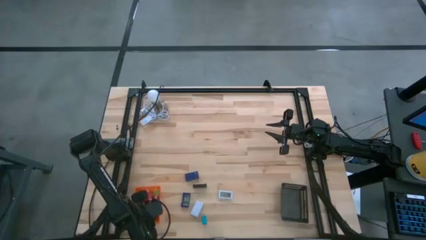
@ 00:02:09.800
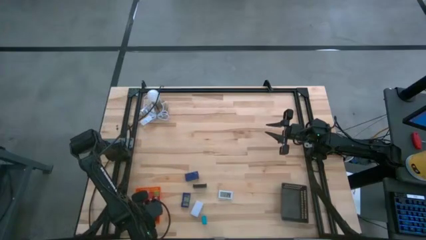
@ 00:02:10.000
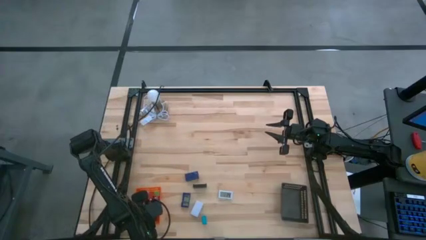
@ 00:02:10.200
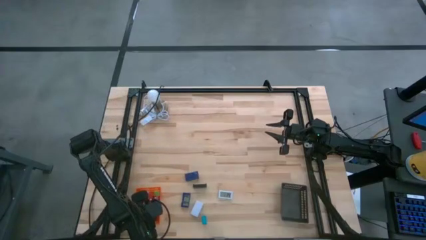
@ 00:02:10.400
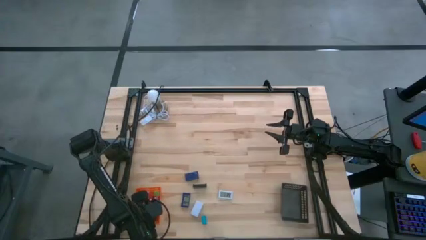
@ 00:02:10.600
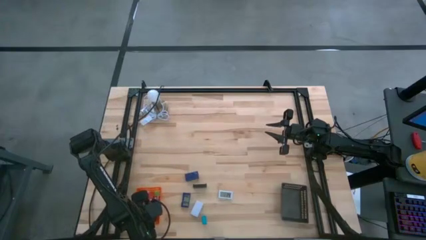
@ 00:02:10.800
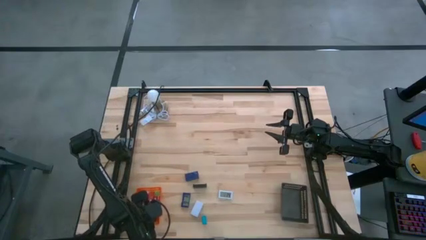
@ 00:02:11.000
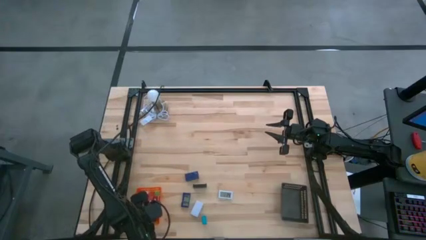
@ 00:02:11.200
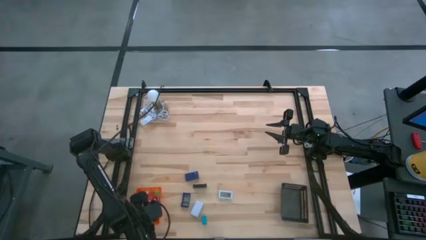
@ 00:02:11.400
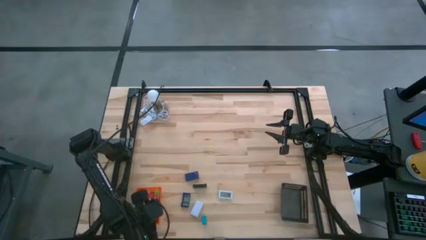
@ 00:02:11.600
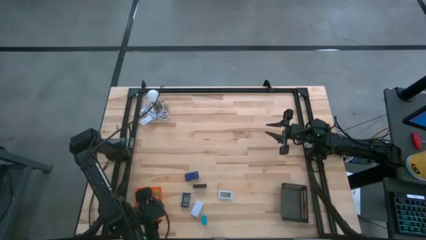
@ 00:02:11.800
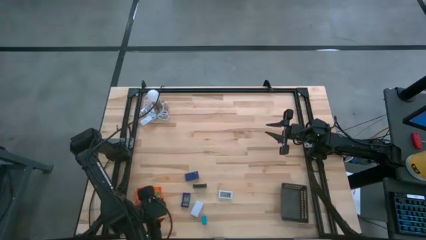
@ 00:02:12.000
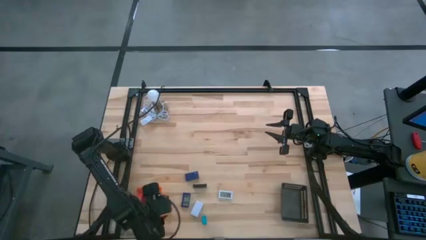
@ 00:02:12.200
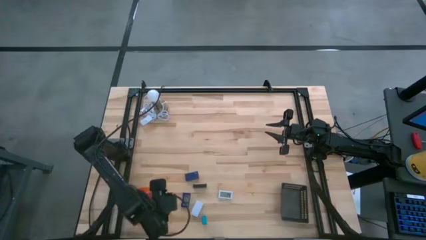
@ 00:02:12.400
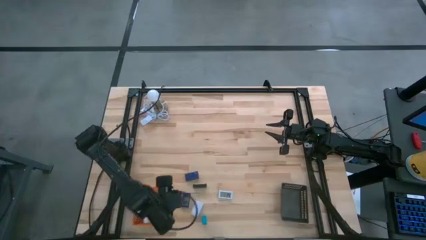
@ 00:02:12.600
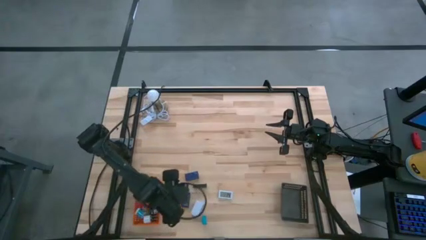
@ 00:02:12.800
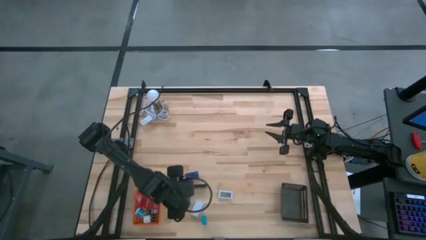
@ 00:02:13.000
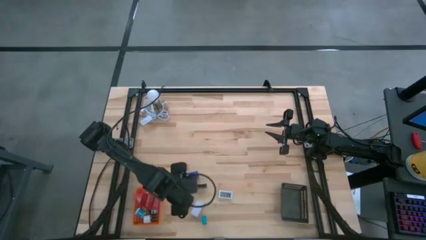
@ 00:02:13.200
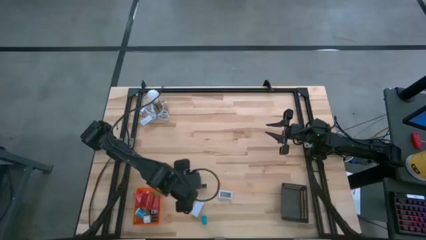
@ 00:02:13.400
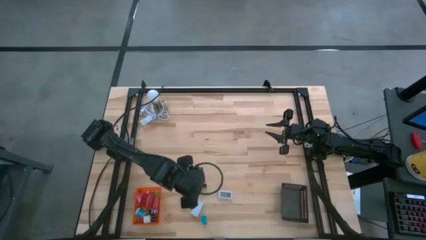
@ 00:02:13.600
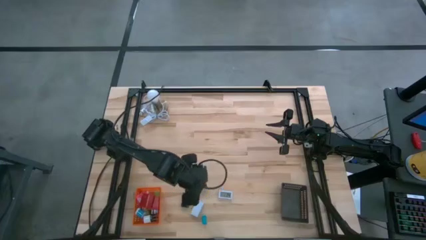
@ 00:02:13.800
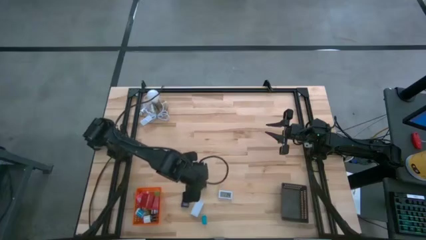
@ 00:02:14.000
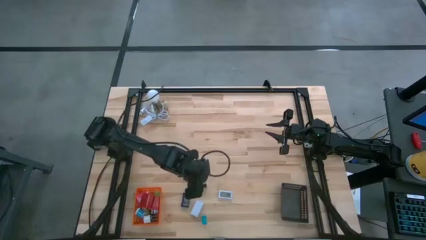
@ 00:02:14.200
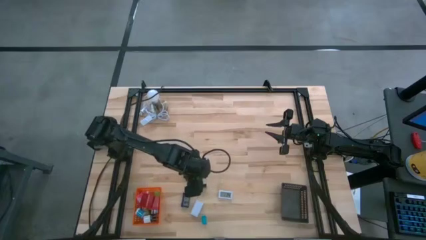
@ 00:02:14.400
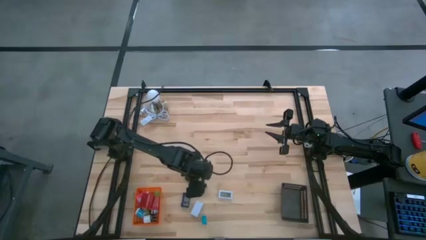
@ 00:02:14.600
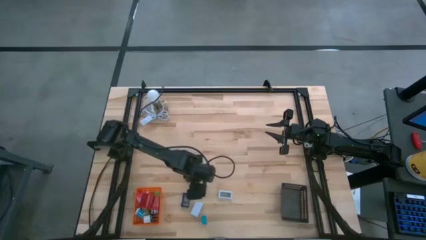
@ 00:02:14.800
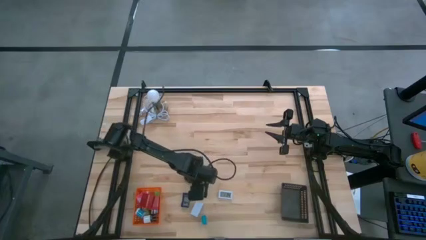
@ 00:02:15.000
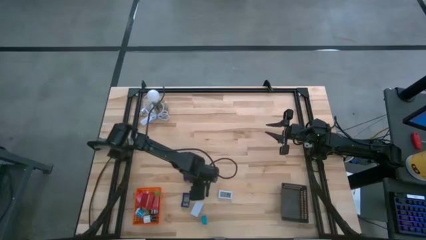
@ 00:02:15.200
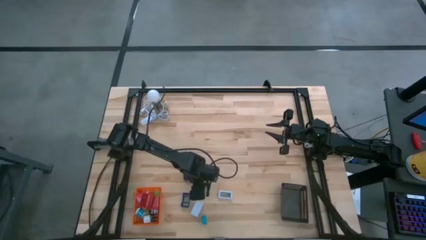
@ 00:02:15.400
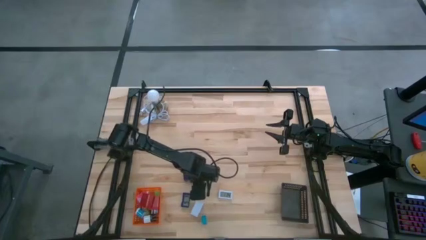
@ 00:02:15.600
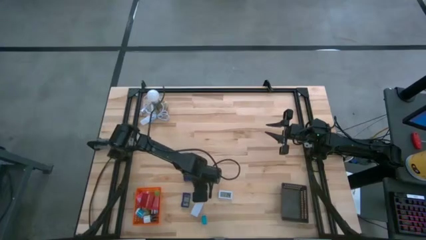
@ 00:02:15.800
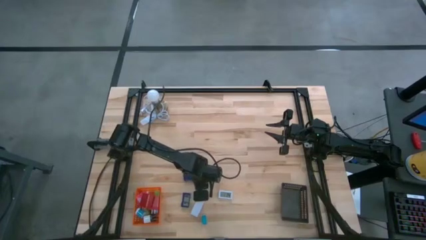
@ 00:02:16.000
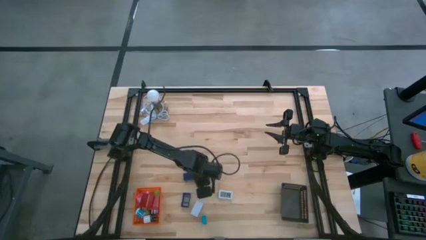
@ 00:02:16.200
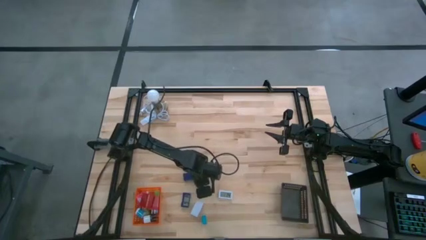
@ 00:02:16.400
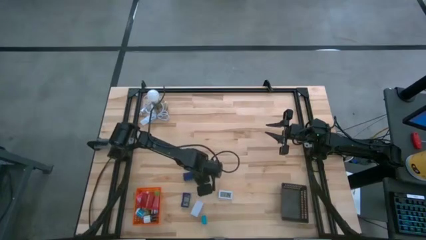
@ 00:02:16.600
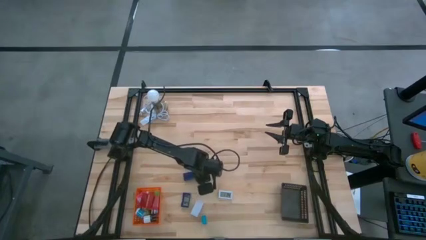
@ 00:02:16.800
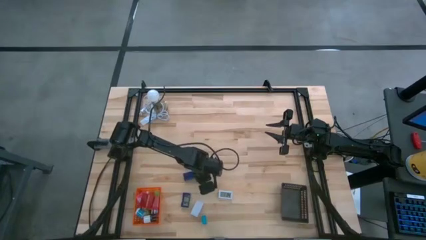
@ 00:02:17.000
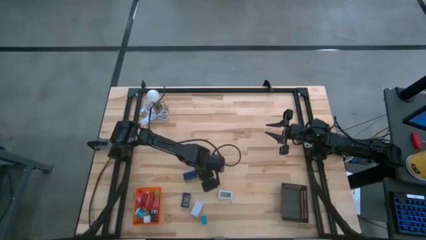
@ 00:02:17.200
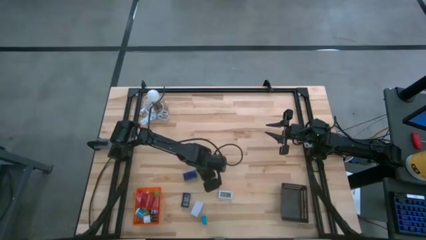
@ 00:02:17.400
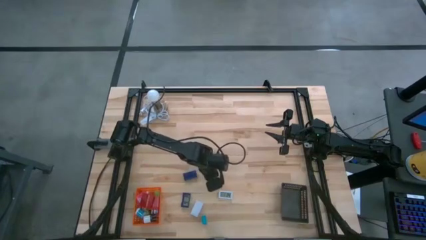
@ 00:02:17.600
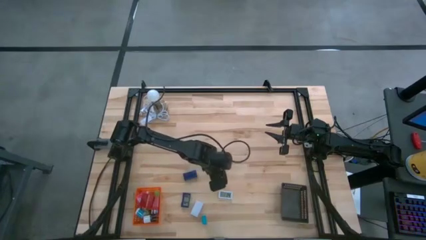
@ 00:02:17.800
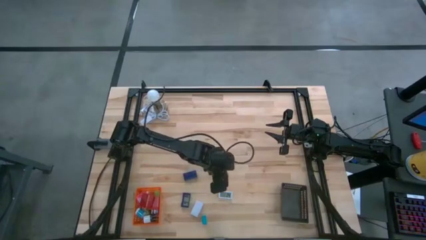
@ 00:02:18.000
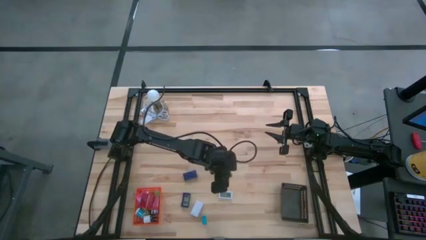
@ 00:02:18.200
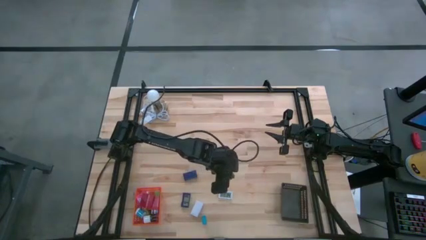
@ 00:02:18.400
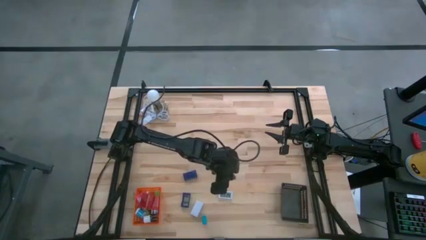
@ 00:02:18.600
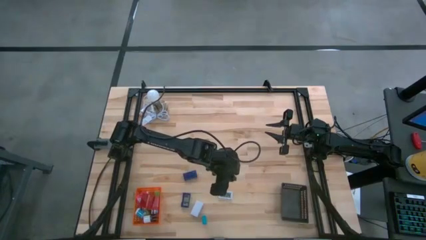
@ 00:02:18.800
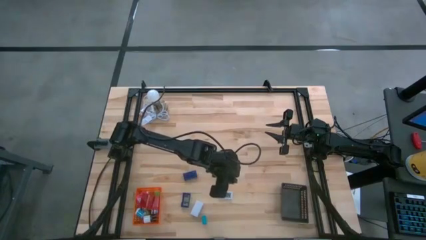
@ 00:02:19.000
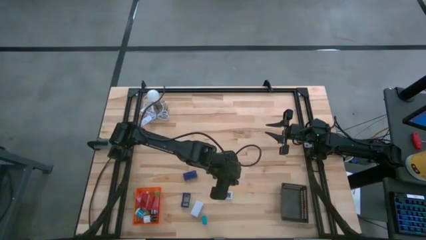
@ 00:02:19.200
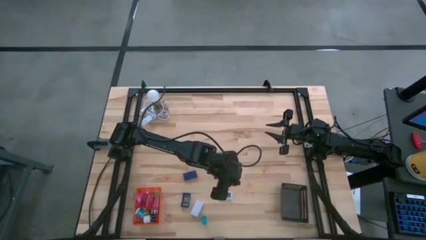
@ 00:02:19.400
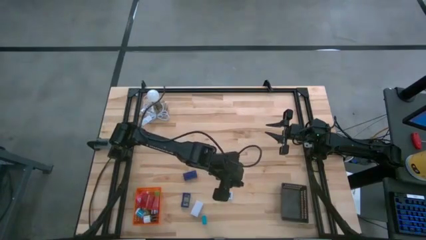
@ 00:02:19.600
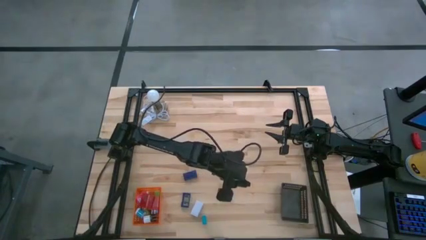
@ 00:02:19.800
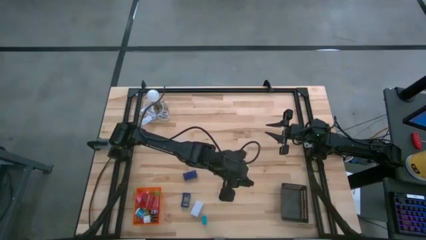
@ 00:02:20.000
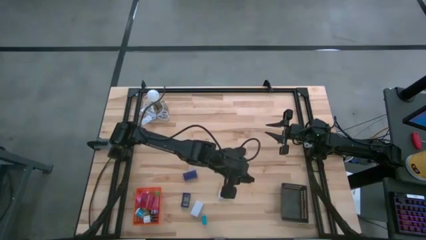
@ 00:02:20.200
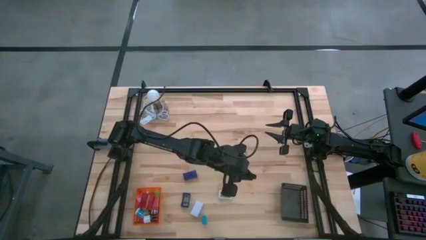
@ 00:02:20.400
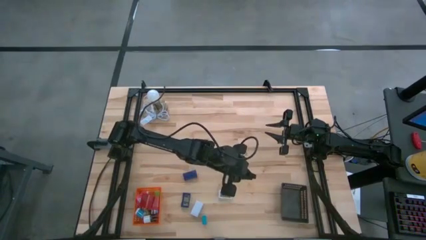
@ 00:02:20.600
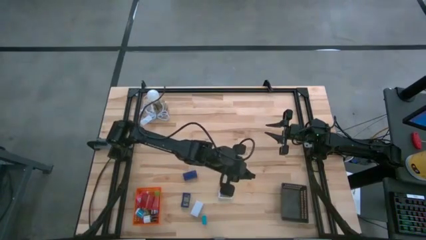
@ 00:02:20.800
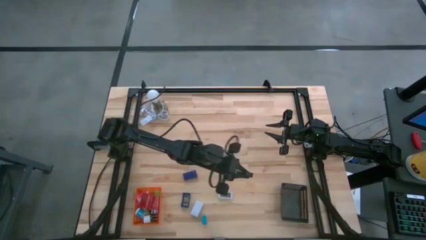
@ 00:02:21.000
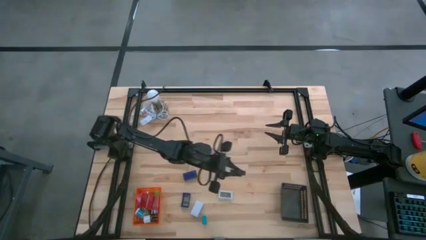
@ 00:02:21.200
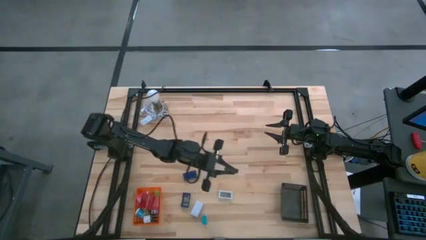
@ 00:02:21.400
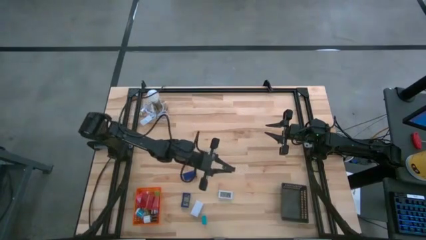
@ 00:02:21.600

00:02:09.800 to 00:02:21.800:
Task: Pick & Place Office items
Put the black digital clock into the black bin

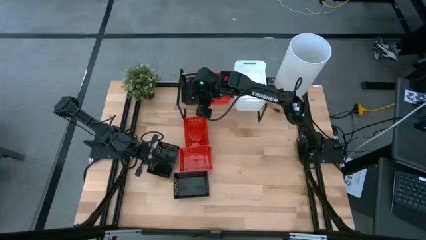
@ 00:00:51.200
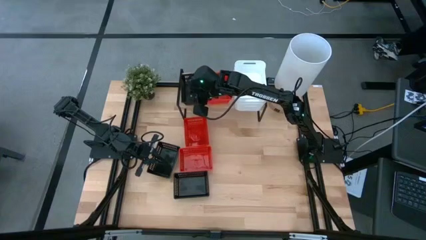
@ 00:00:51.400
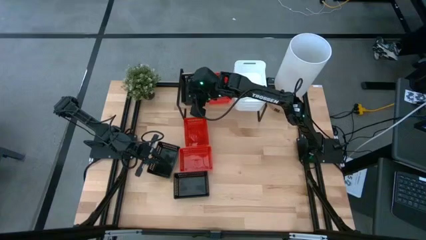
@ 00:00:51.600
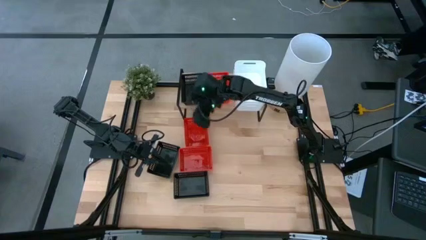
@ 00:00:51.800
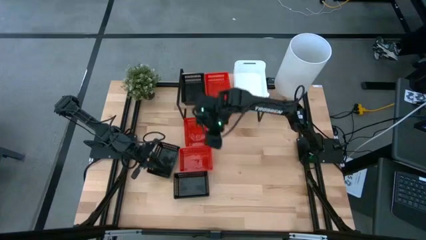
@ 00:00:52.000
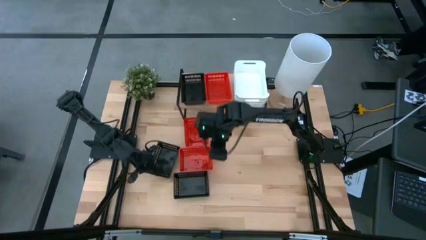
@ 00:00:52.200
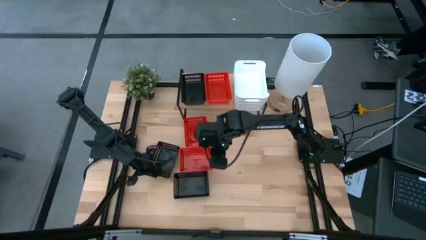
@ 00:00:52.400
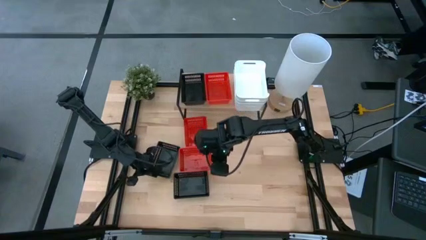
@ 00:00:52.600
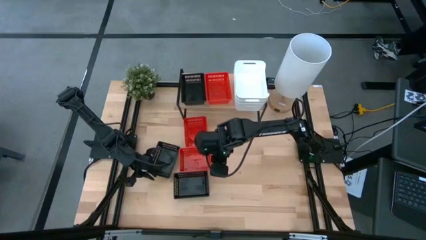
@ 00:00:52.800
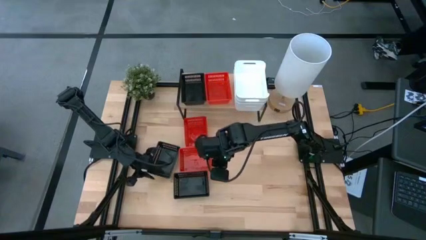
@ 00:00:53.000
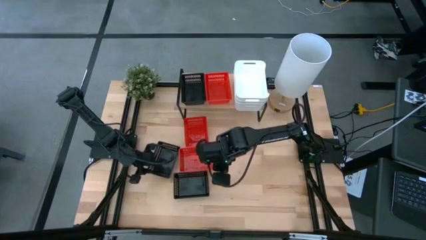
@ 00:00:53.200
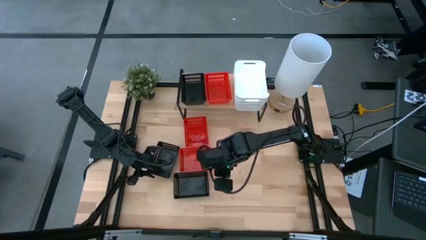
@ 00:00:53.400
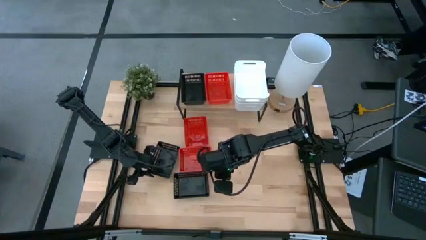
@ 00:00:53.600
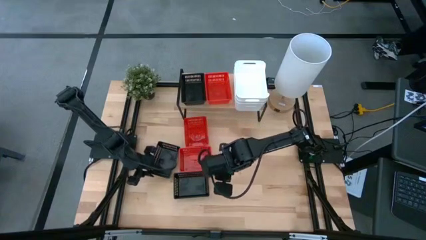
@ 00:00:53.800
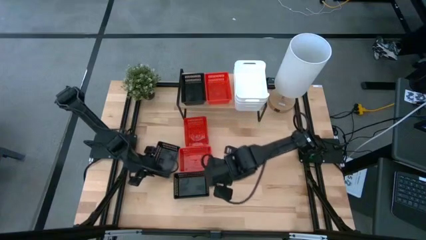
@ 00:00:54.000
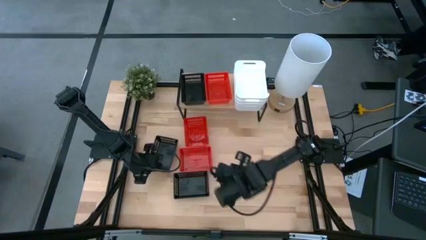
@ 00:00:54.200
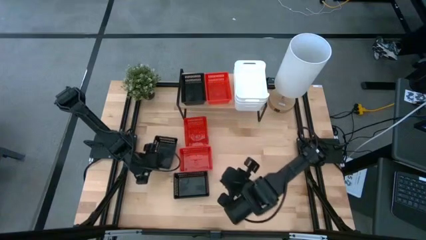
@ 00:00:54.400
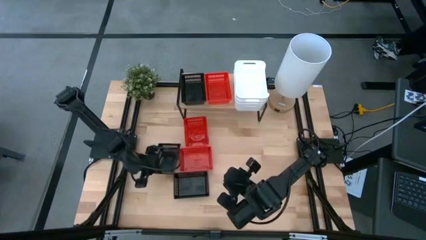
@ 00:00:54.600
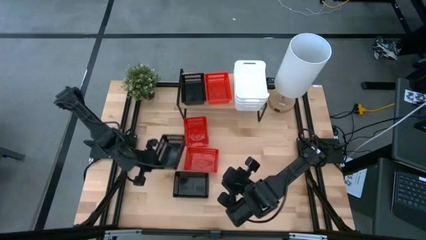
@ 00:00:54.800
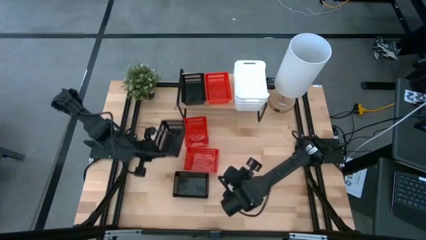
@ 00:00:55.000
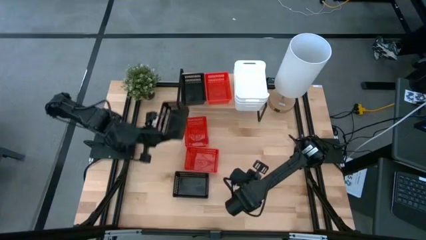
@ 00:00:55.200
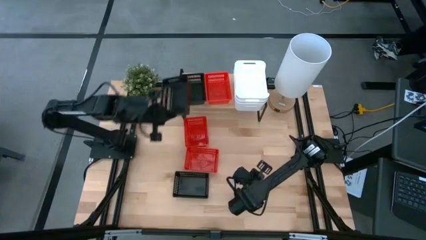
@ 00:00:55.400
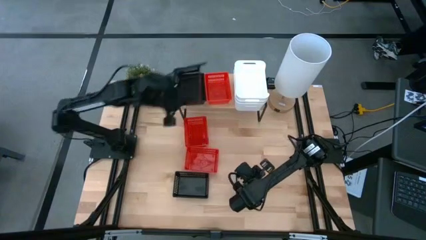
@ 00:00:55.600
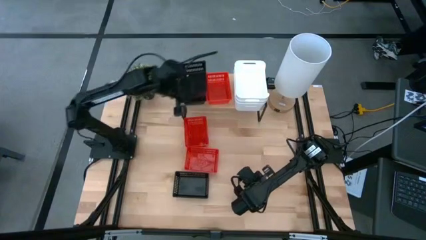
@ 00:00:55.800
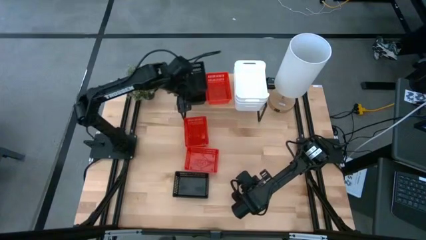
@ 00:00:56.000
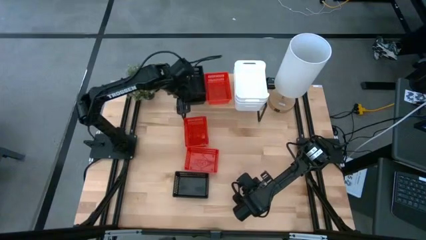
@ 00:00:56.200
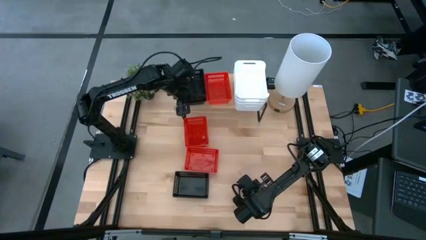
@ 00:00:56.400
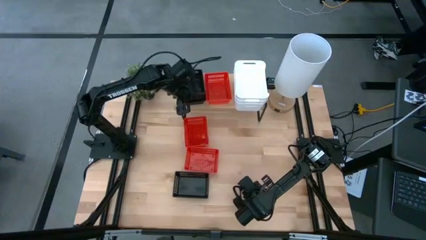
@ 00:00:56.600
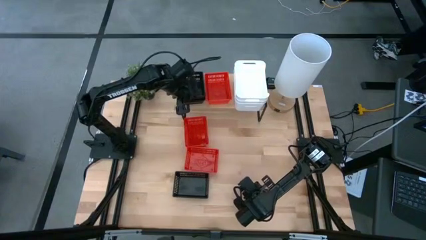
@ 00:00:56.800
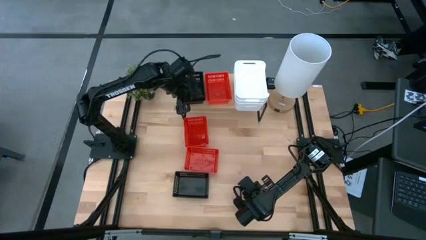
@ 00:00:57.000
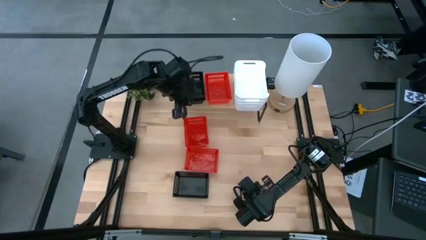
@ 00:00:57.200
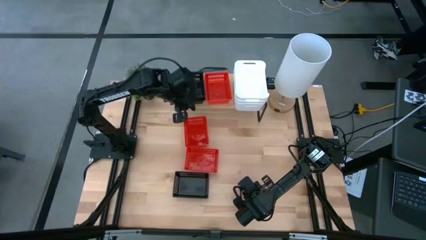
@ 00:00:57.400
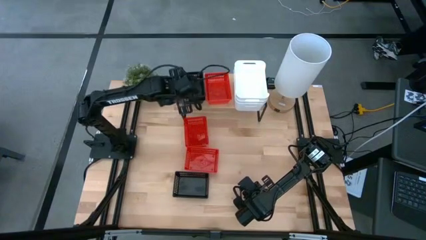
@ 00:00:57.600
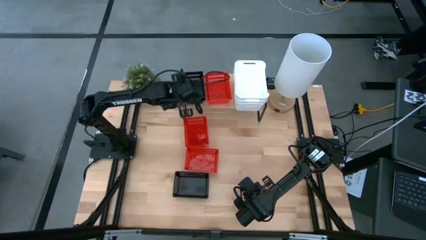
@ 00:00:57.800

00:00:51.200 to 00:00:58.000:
Task: Stack baskets on shelf by color
Stack the top black bin on top of the black bin on the shelf
